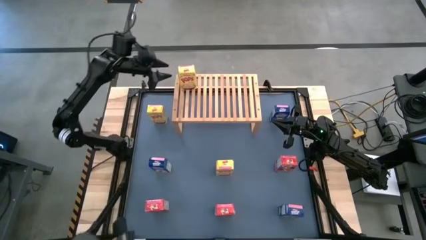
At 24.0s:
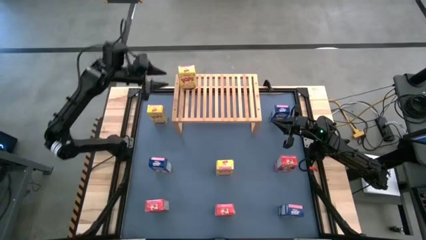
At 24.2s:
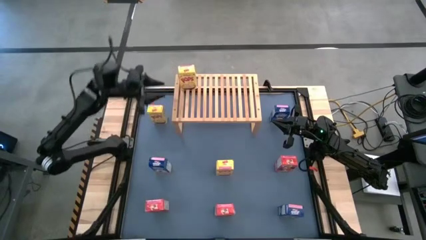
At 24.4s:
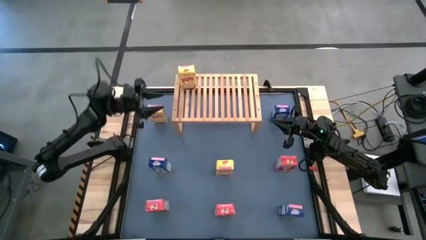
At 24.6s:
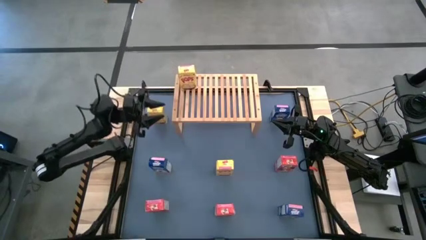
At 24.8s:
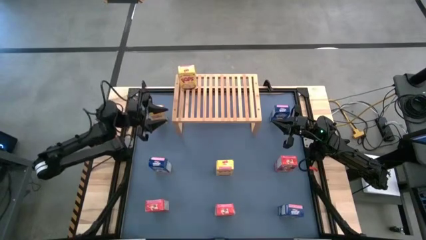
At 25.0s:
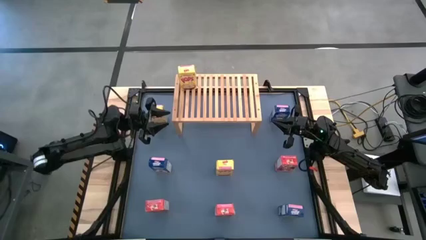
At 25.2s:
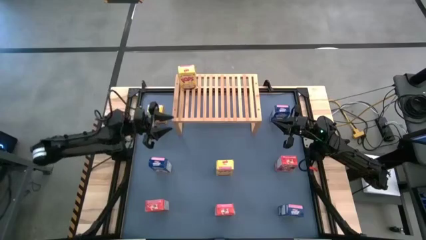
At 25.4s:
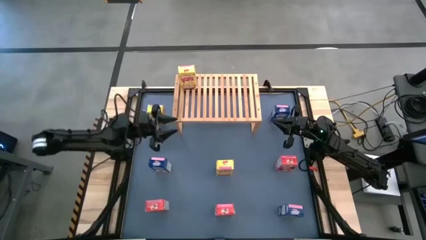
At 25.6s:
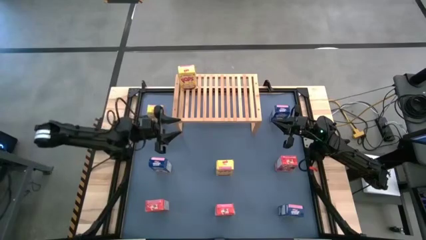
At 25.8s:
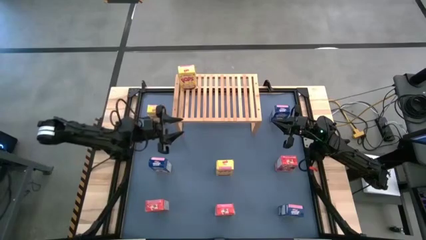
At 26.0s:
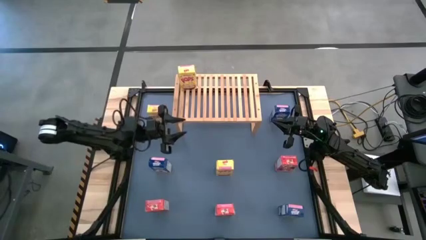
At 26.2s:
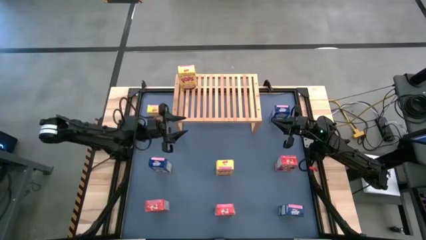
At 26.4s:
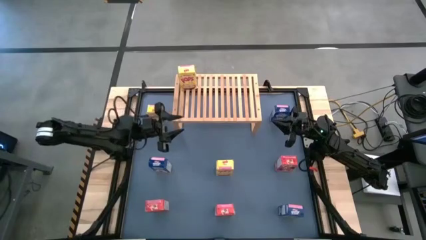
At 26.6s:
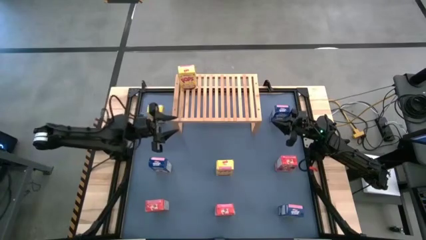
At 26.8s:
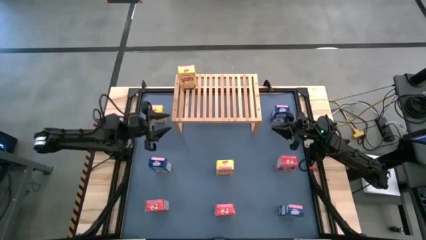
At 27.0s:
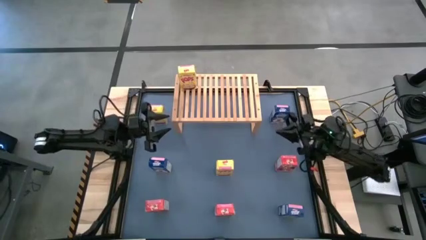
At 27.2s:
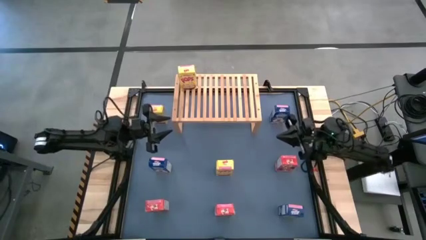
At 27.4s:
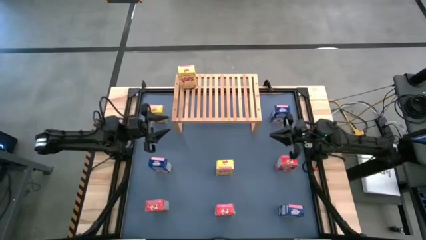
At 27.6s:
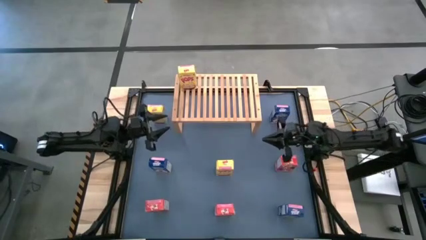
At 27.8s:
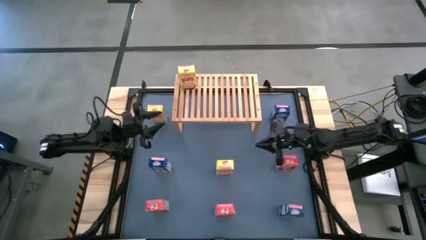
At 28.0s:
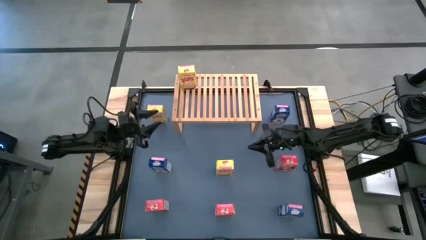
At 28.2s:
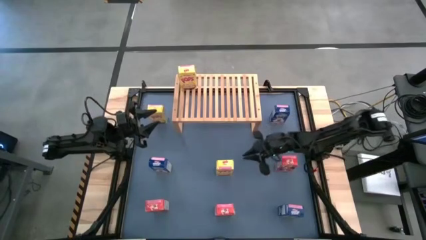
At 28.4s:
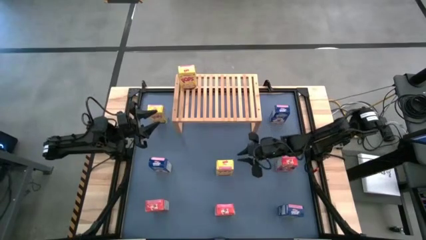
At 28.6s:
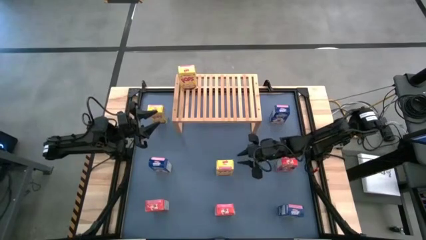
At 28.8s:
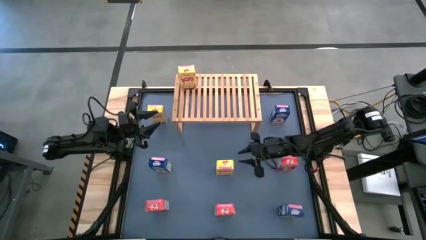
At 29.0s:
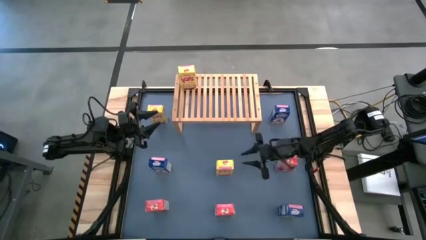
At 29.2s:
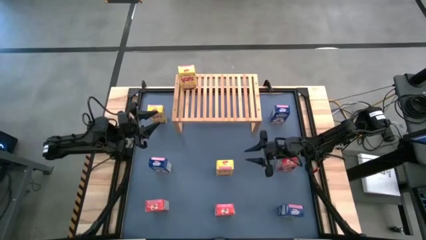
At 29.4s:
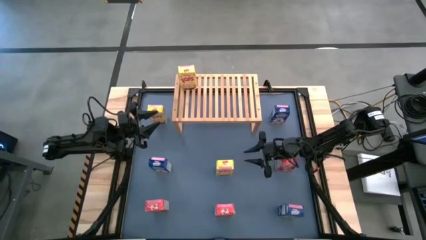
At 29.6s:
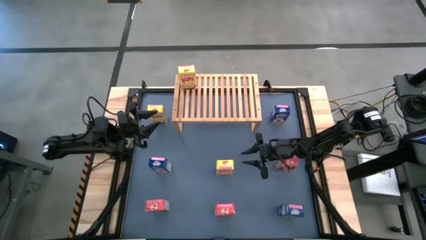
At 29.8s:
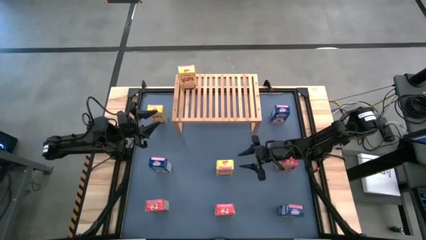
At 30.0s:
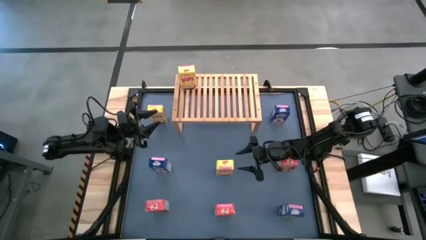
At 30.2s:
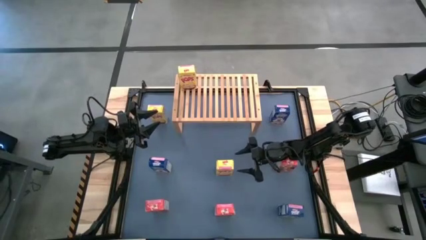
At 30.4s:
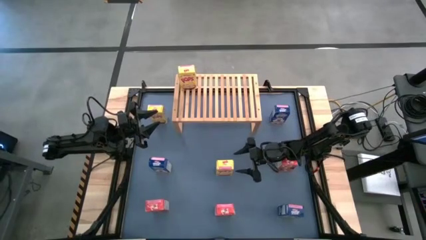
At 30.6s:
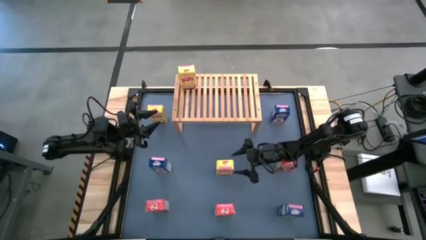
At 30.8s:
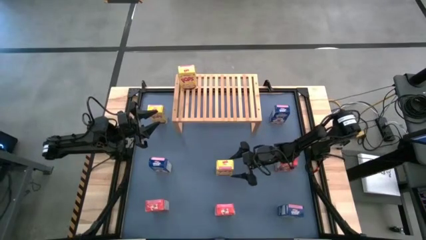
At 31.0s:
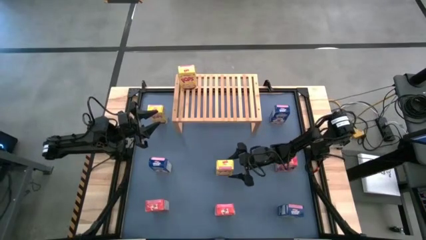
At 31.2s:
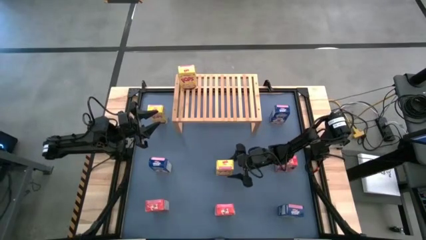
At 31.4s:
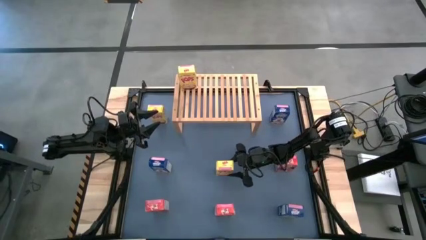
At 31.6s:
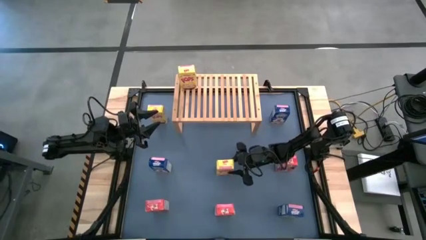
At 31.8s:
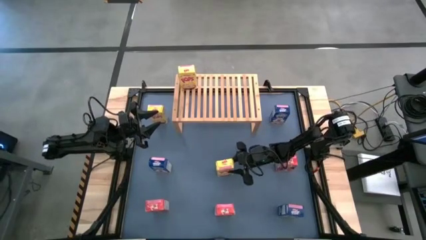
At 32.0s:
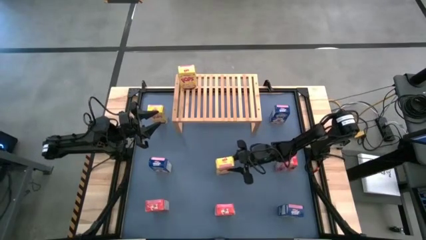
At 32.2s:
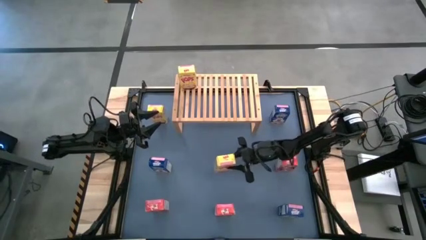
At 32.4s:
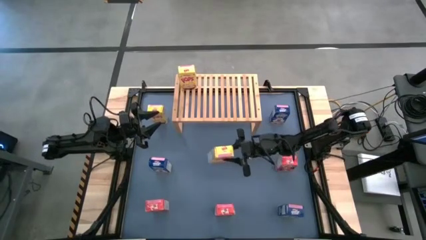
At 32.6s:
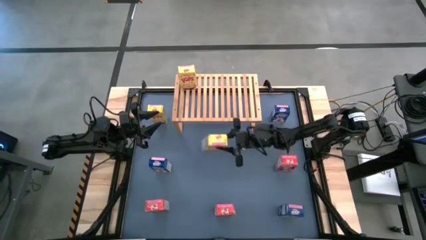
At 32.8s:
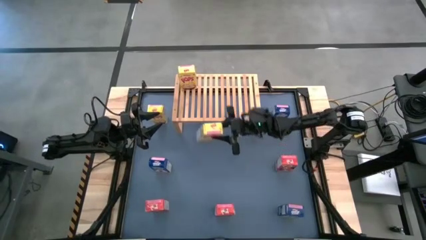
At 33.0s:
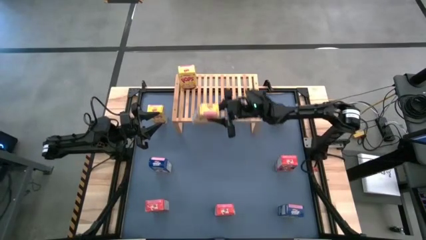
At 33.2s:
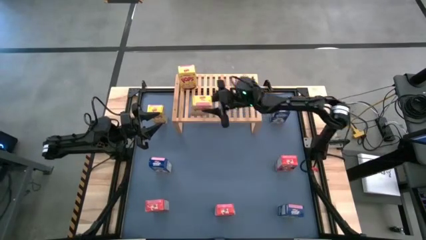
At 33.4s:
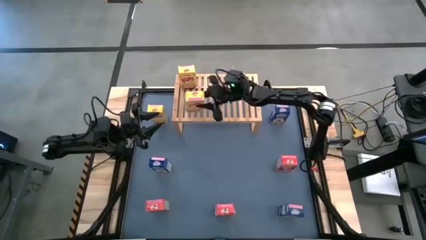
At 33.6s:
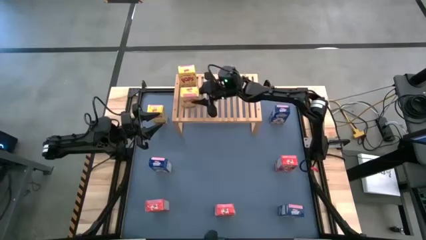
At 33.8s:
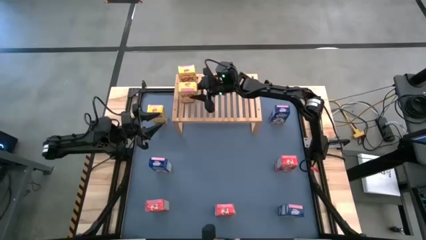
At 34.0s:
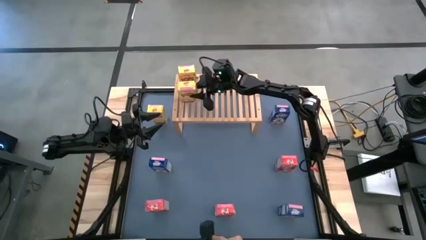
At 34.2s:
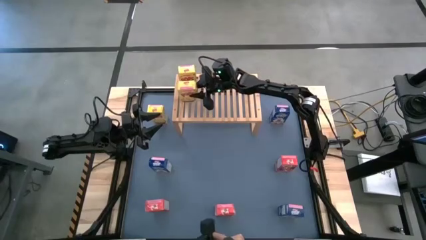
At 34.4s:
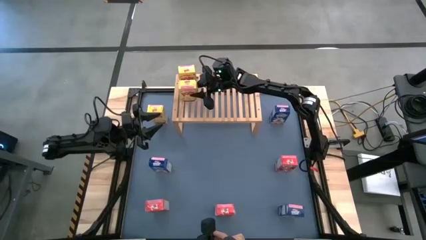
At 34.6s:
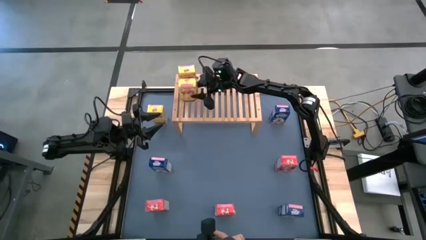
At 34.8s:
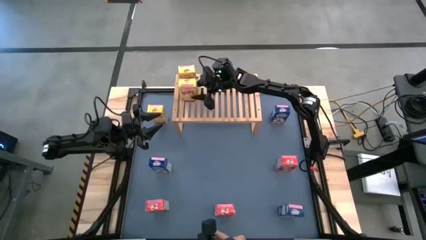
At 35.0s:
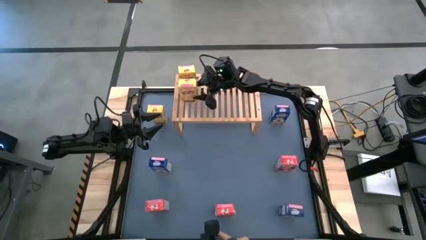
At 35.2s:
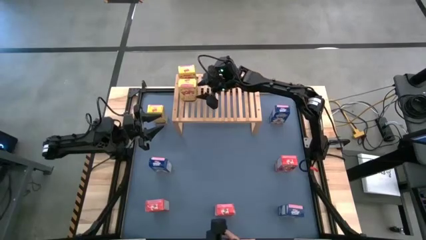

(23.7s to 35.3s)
Task: Stack cereal on shelf
Put the bottom yellow cereal box aligned with the other yellow cereal box on the shelf

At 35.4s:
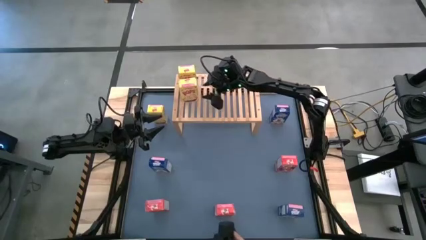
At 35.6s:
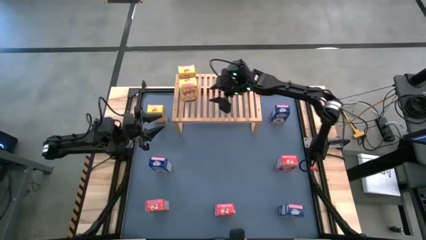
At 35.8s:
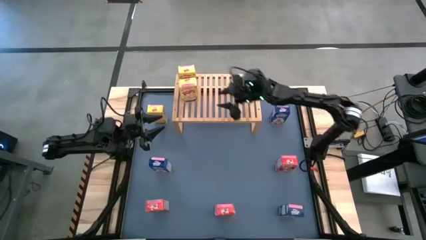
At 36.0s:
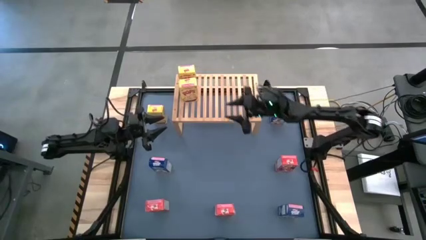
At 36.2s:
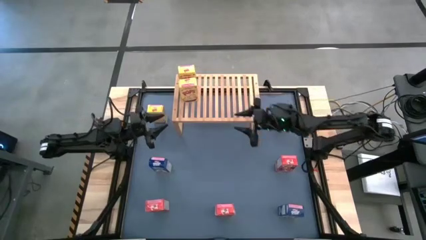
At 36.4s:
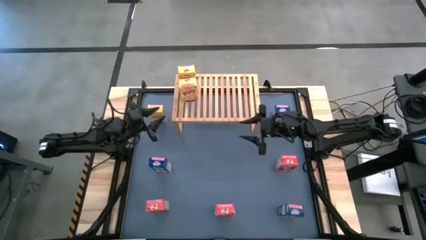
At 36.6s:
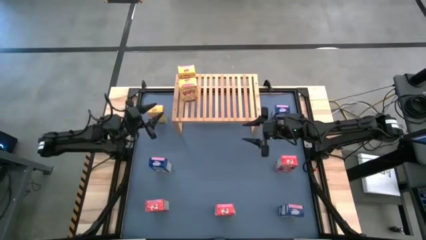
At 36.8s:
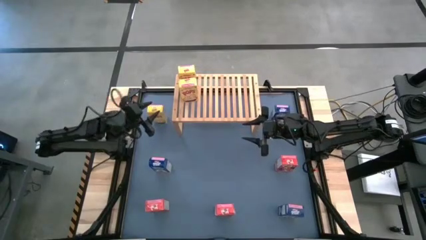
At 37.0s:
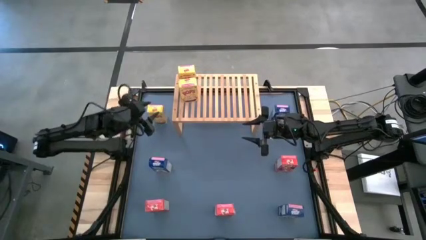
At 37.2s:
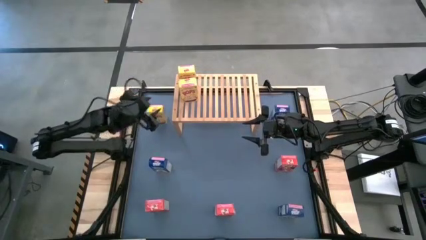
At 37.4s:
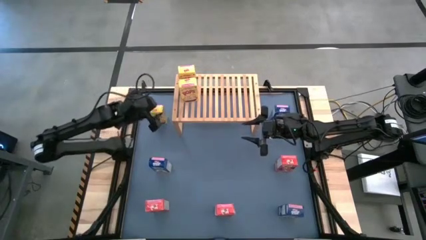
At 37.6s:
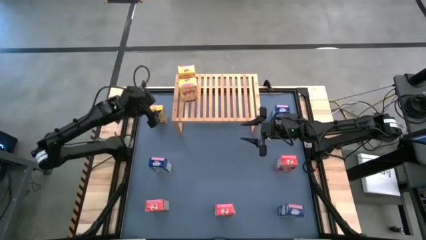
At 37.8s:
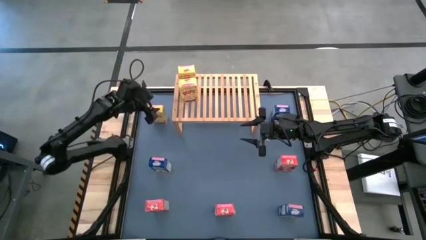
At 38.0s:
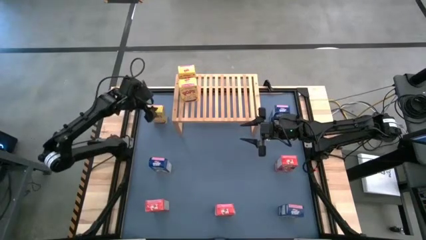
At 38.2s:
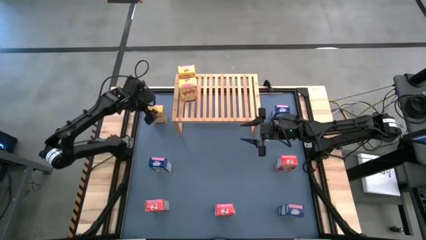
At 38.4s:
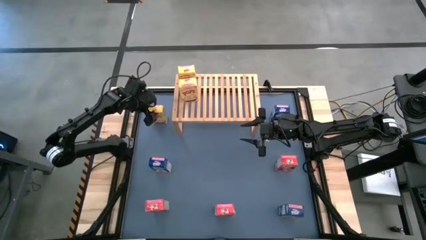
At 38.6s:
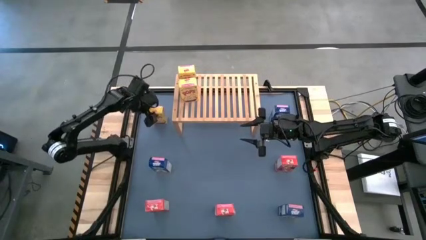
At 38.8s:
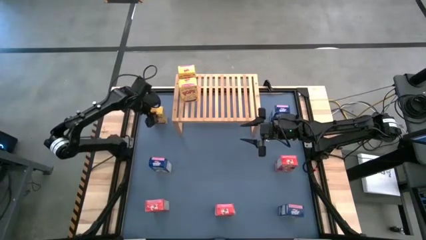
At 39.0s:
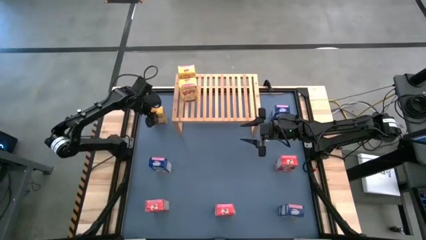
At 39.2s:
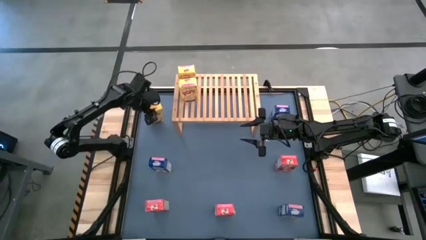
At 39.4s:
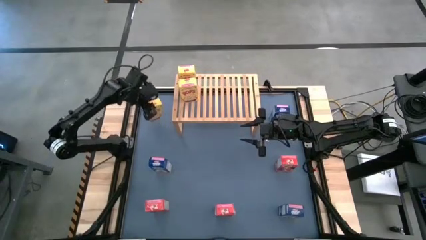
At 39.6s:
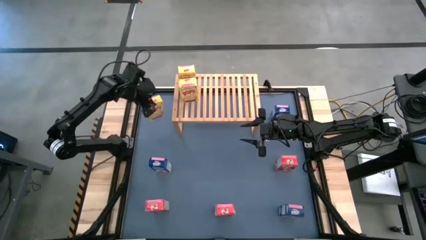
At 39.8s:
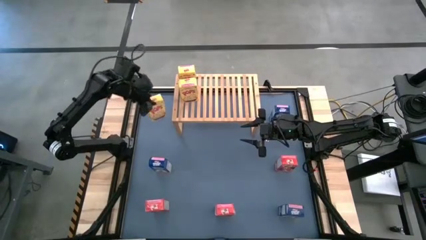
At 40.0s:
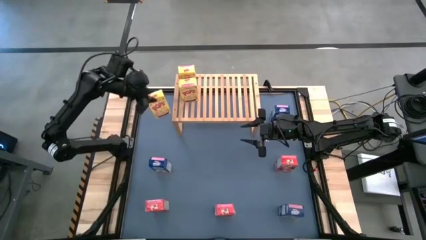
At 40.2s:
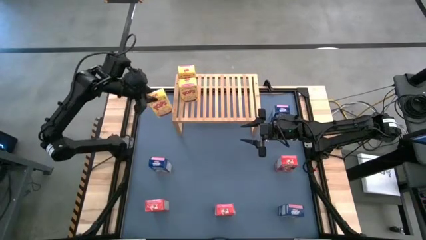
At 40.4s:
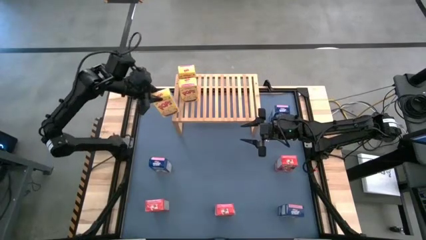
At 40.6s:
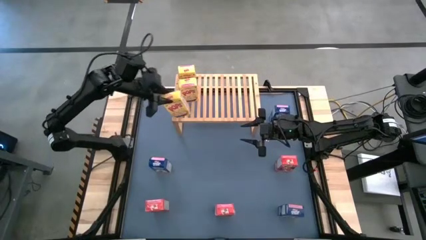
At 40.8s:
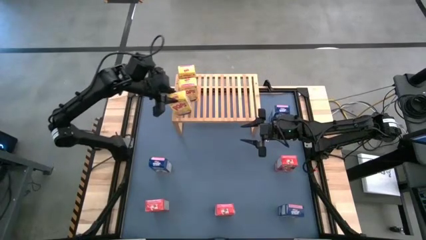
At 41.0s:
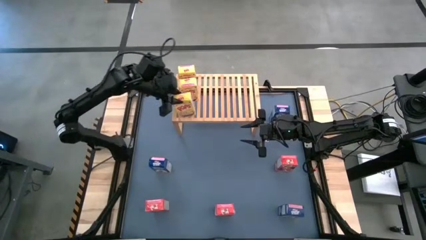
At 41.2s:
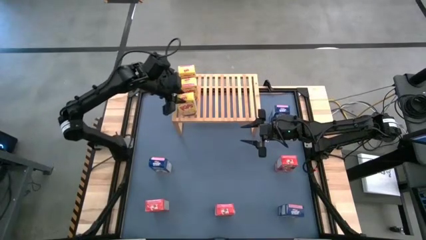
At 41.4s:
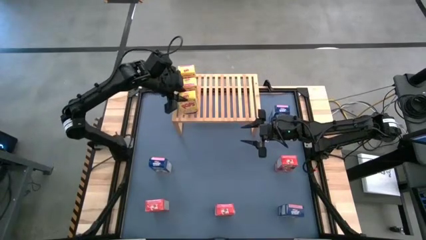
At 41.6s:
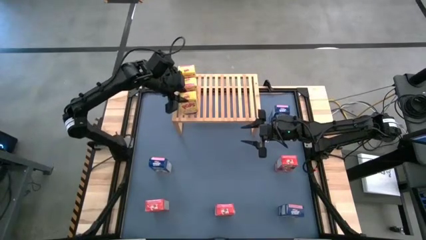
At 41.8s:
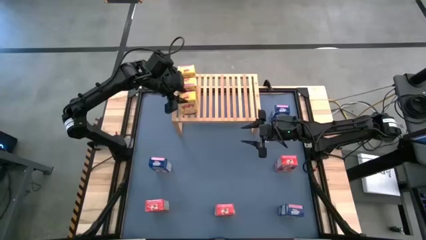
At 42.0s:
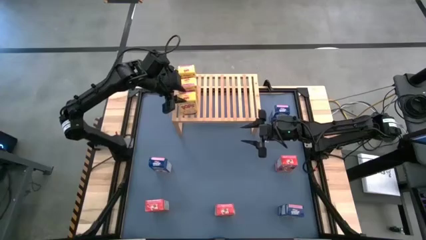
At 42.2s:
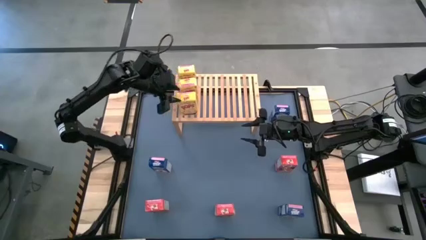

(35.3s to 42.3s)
Put the yellow cereal box aligned with the other yellow cereal box on the shelf
